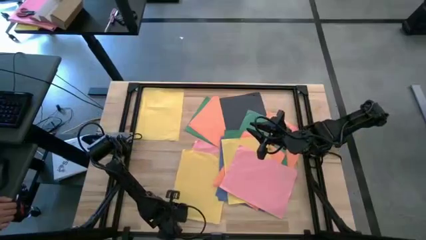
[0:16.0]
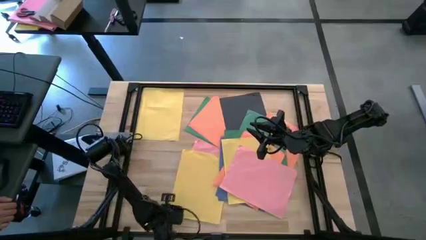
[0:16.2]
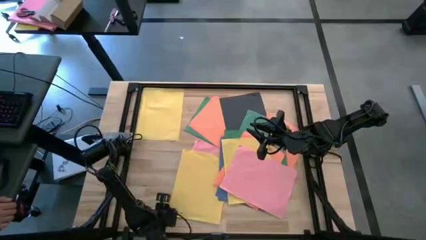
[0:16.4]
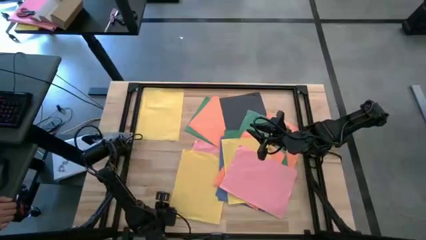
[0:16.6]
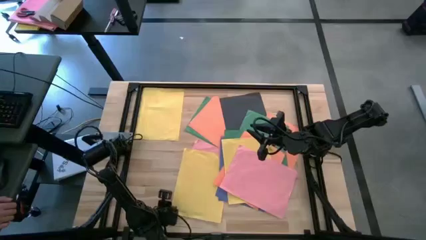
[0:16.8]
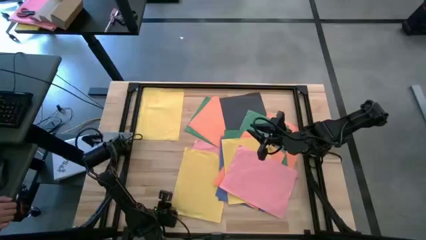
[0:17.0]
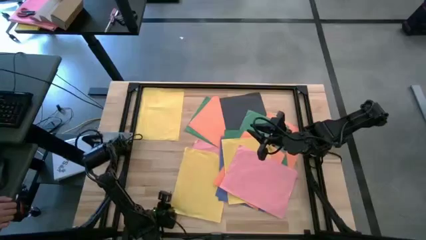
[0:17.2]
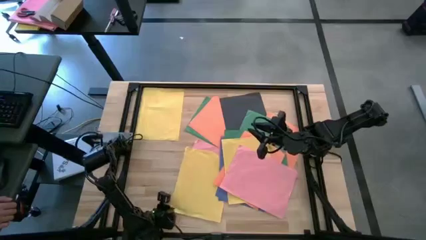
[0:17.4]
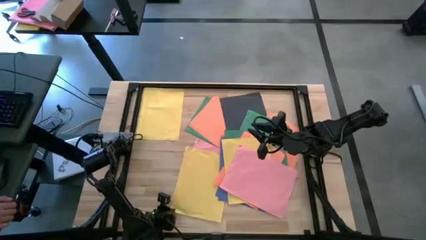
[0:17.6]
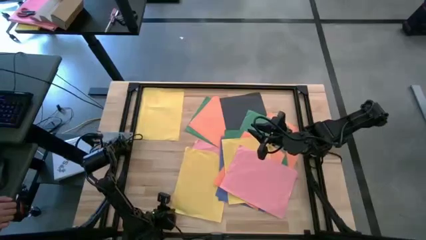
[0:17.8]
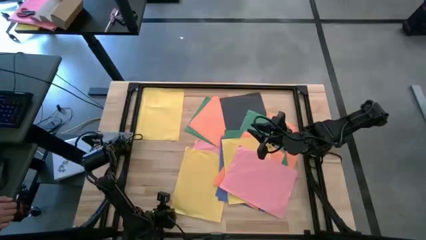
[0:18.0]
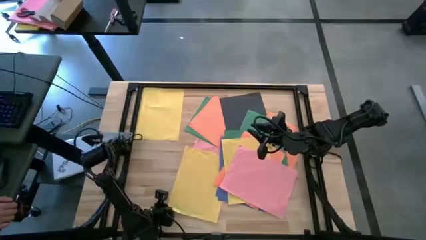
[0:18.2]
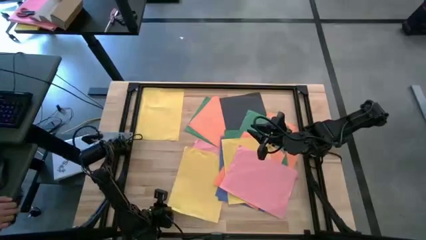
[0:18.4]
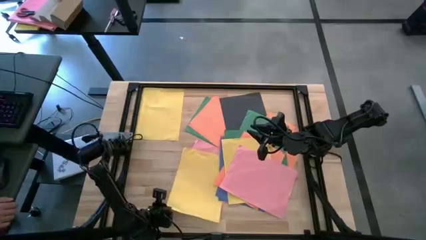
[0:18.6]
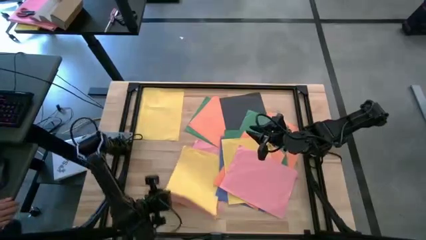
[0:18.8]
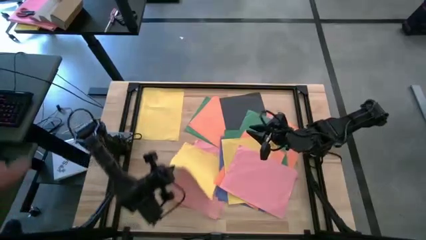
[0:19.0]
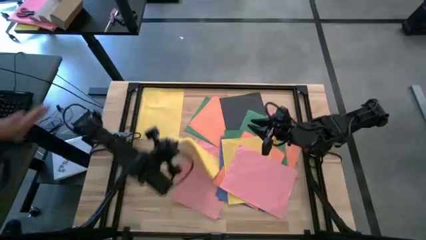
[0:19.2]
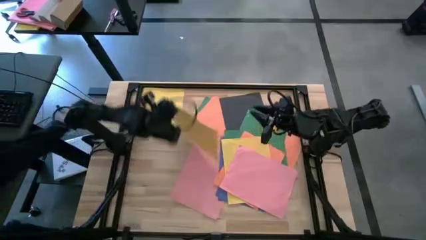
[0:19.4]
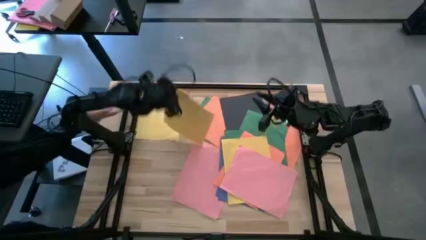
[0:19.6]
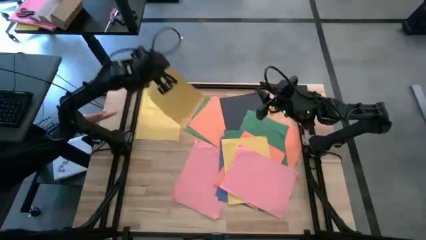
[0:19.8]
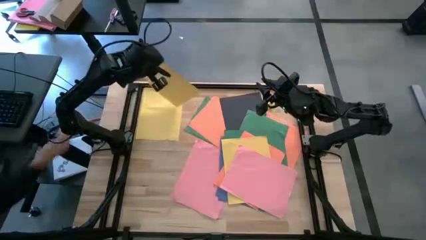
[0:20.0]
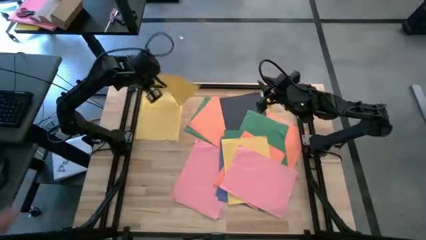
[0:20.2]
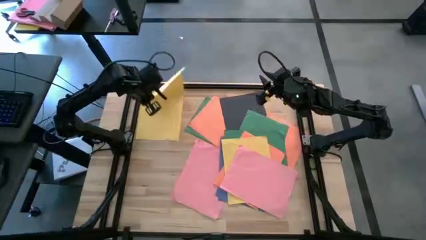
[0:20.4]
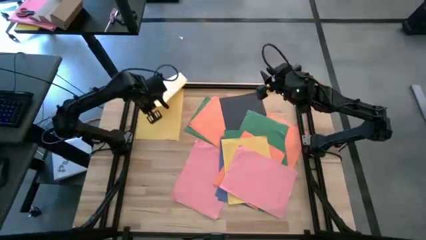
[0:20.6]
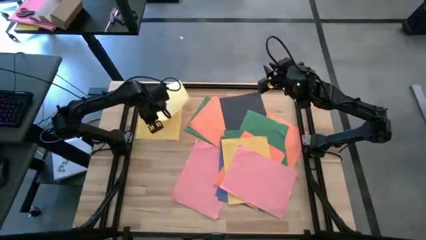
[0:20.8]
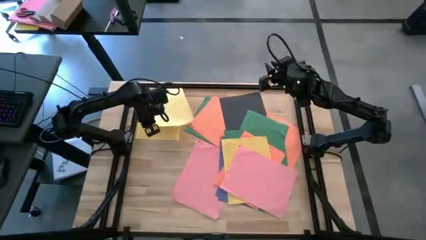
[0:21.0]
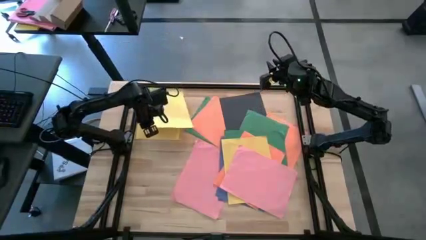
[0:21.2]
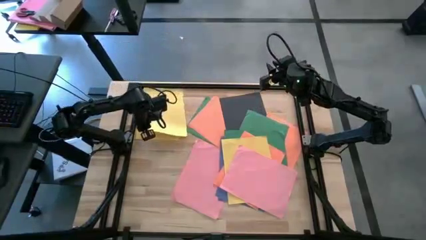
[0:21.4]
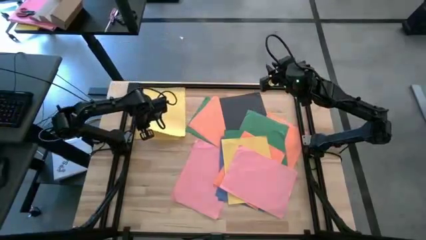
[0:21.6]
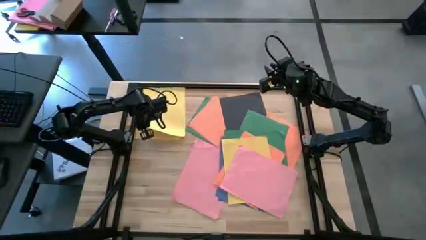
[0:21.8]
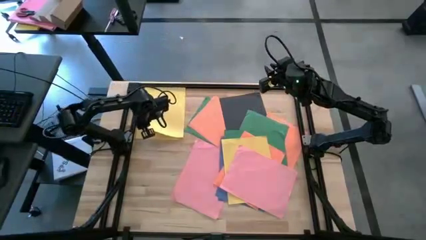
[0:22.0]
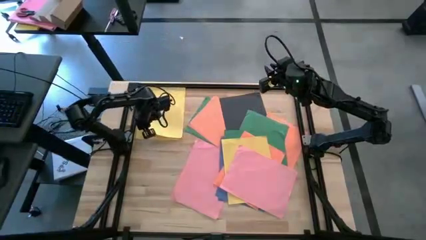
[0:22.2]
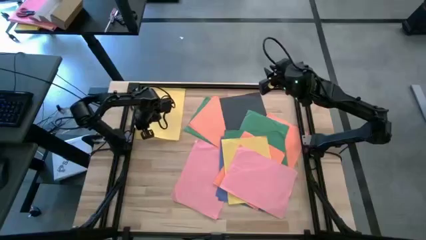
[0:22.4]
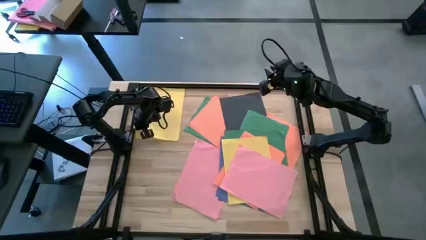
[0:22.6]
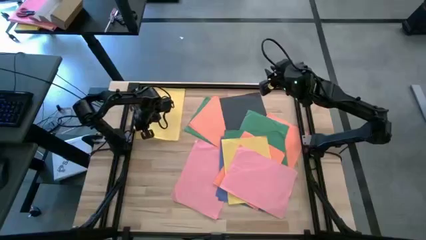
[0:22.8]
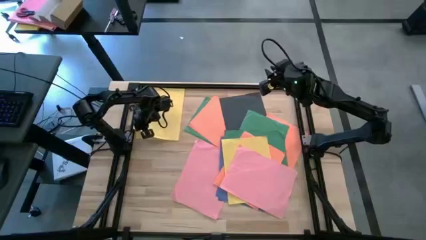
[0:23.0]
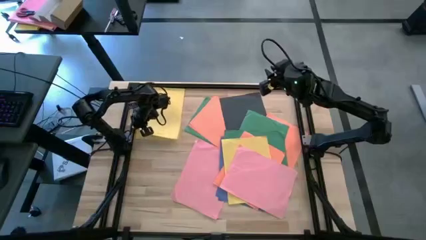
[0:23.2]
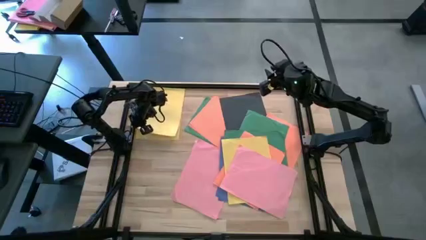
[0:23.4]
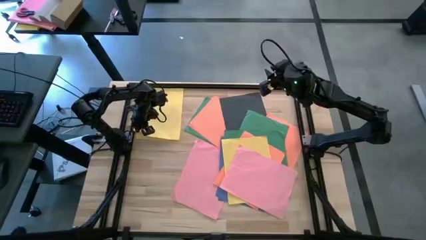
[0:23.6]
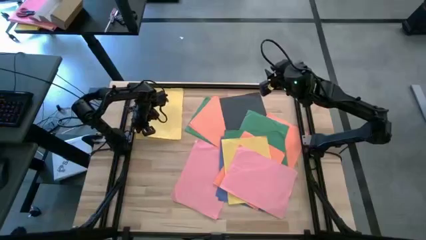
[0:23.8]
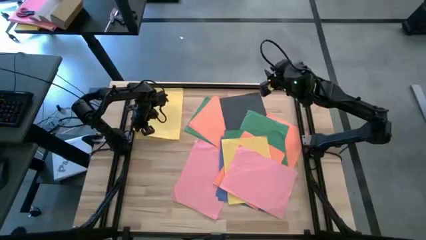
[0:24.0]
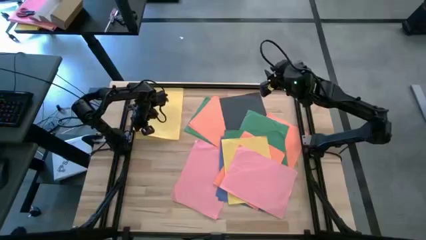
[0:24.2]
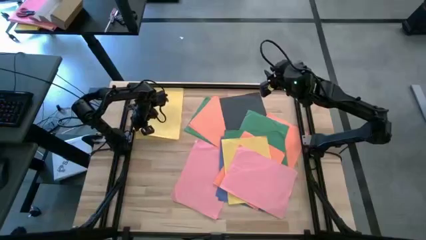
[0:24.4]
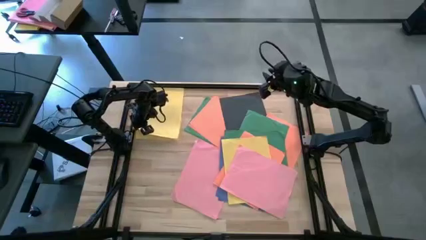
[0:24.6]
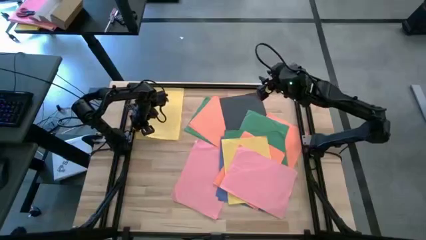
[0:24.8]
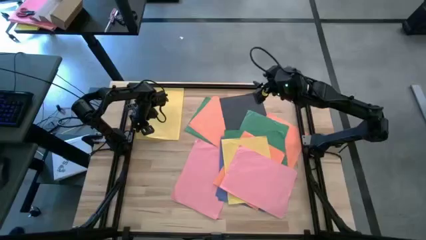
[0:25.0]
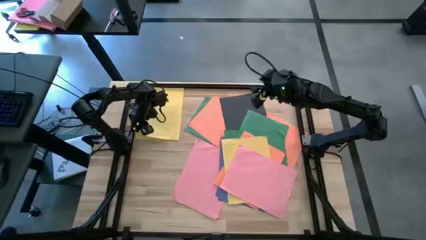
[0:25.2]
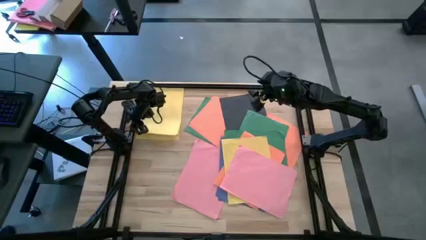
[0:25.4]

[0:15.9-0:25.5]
Task: Organize paper
Stack the yellow paper on top of the other yellow paper

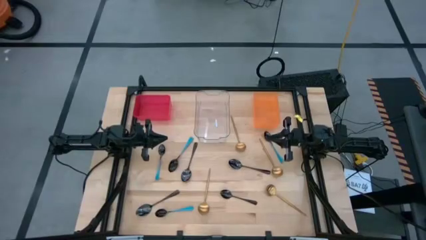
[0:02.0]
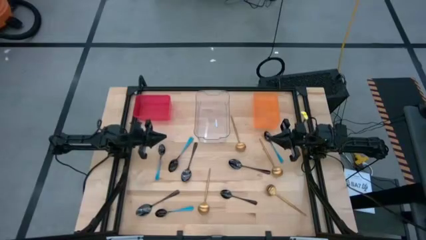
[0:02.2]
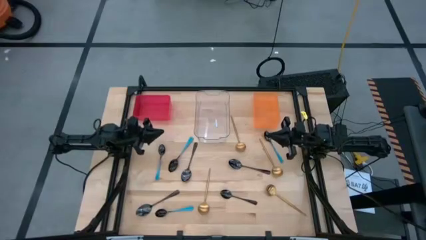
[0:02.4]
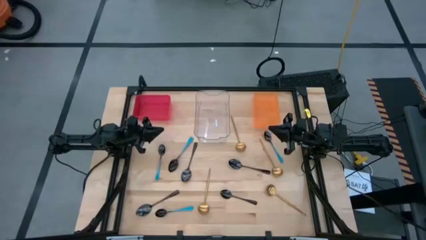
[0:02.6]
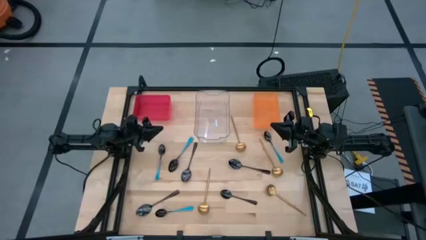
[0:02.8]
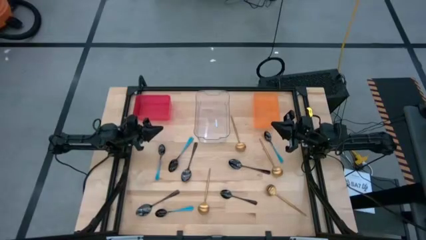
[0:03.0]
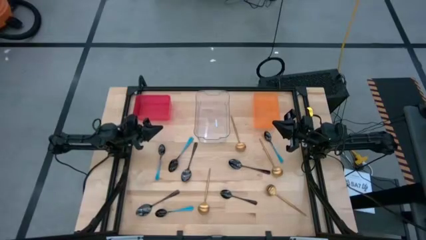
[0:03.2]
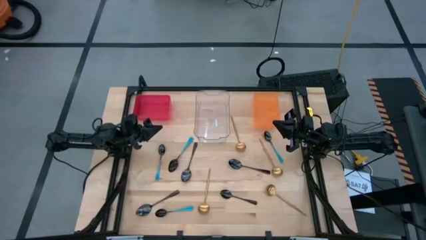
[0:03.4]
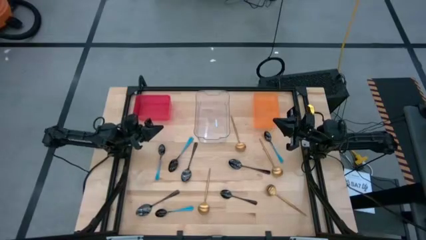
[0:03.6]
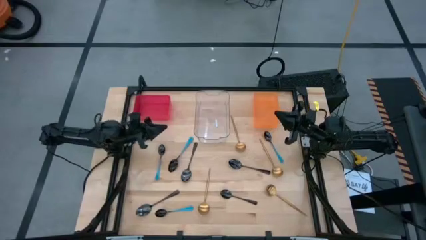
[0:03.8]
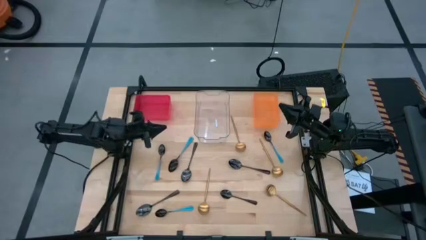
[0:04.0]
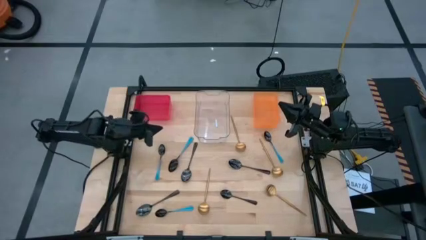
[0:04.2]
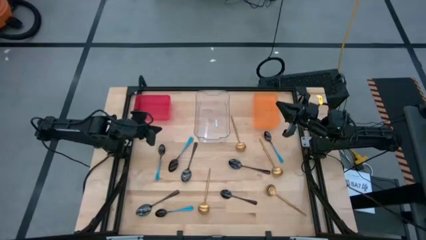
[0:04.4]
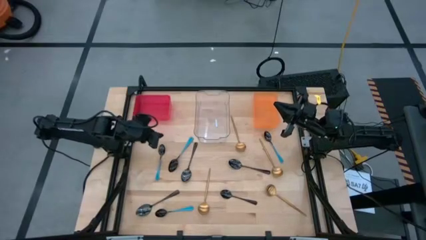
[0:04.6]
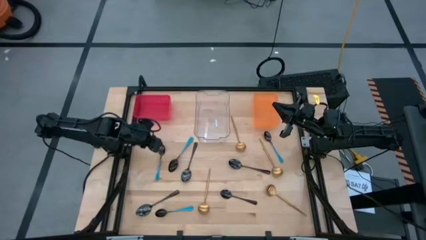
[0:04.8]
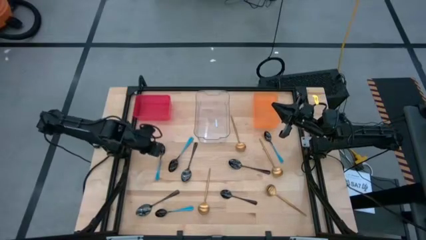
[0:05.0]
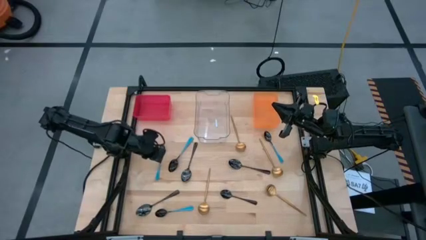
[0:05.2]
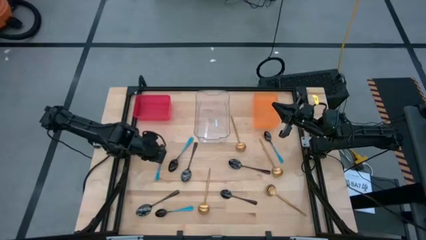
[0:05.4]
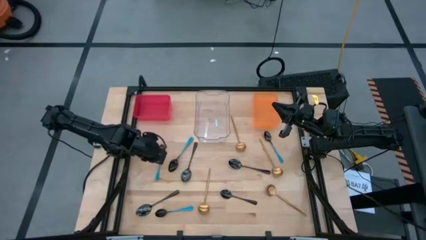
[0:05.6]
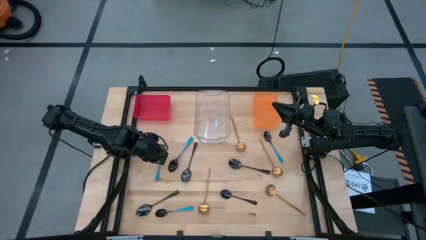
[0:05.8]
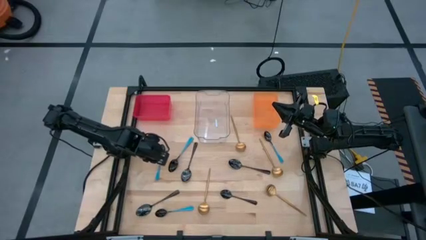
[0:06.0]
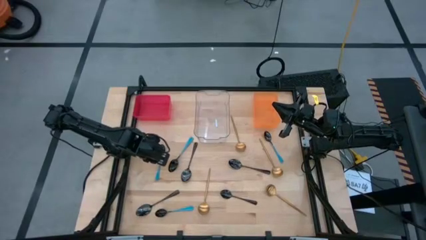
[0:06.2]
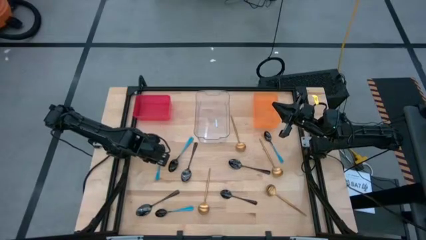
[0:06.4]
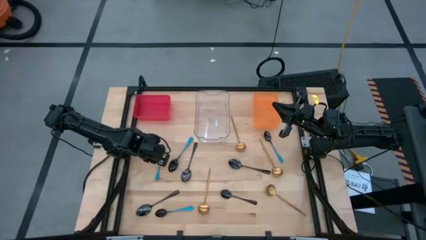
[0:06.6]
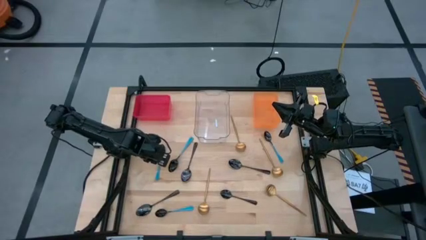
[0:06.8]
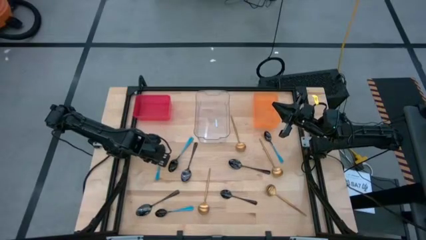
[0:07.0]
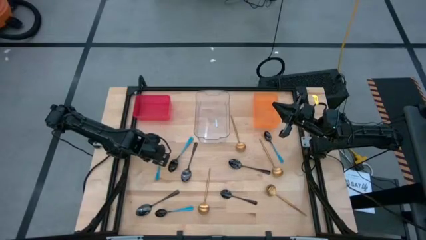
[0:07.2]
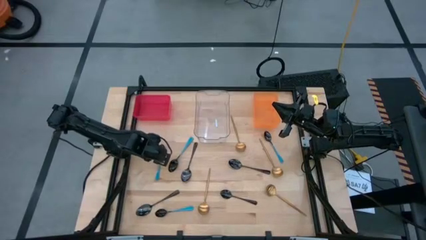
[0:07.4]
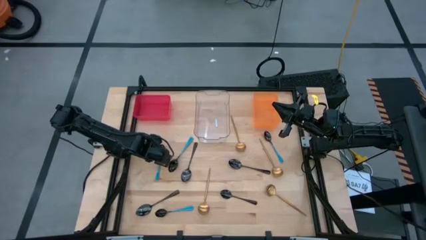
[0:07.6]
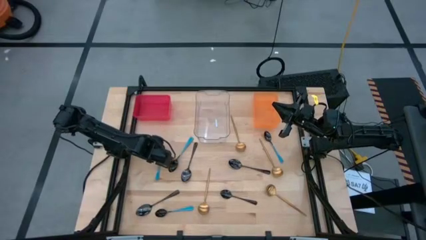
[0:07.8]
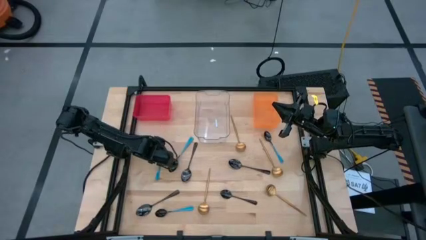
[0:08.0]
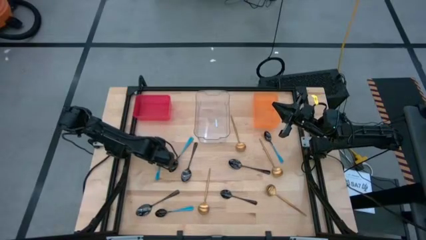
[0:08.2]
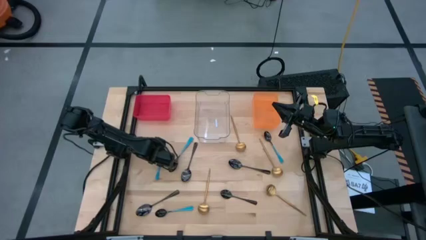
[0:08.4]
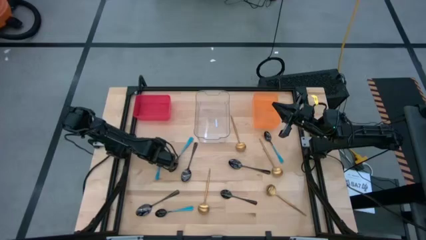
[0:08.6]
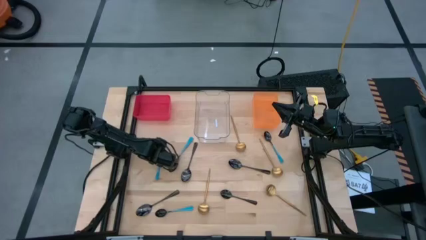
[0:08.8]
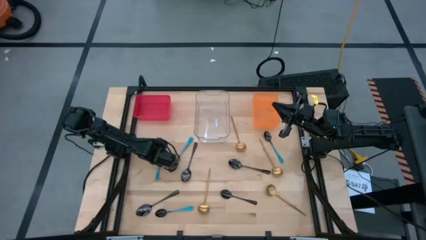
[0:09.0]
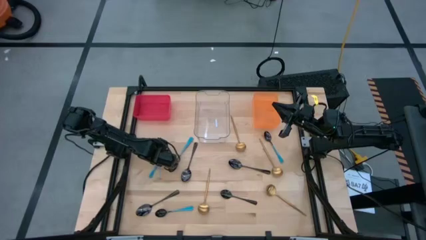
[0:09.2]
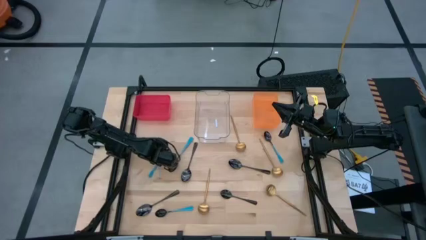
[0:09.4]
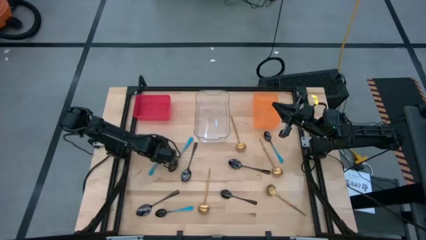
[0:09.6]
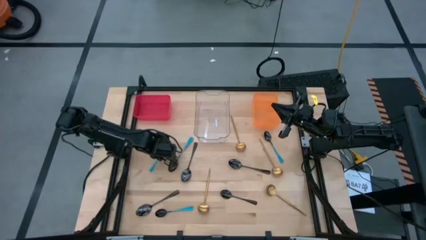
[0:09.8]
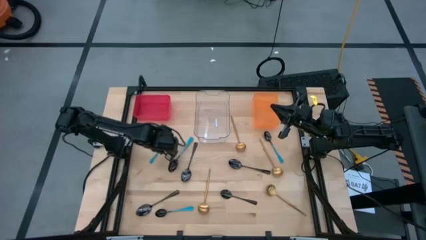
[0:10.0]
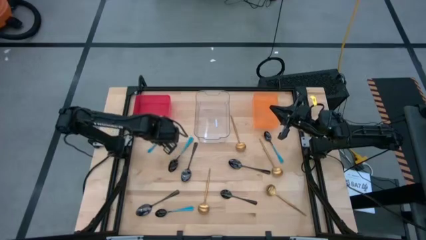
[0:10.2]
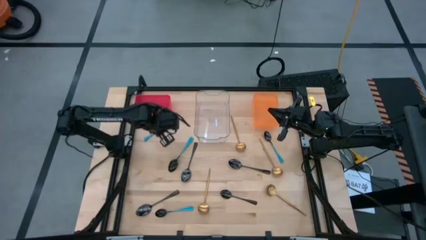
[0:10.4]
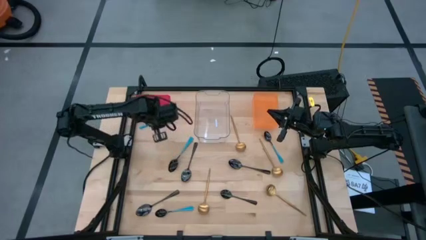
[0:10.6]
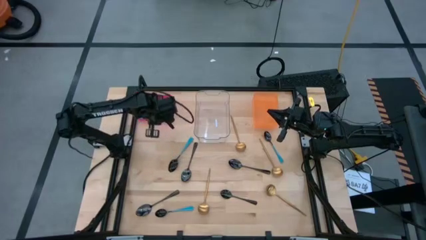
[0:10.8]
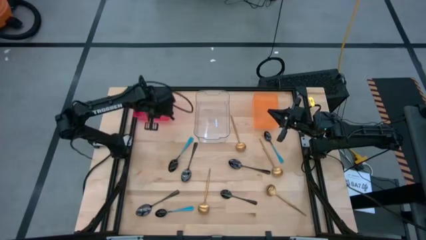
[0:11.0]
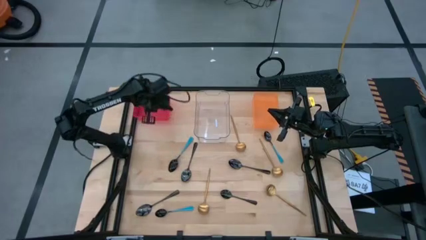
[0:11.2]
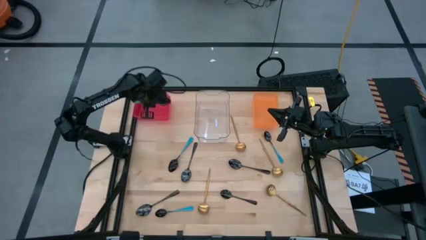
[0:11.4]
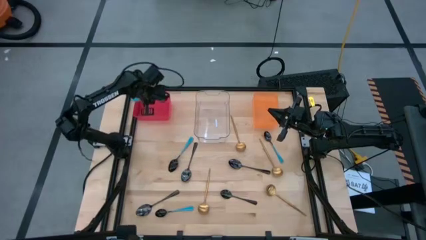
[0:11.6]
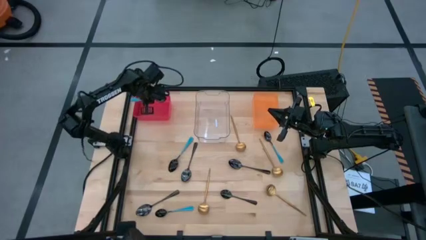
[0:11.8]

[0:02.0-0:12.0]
Task: Sort silverware by color (type)
Put the blue spoon into the red bin
